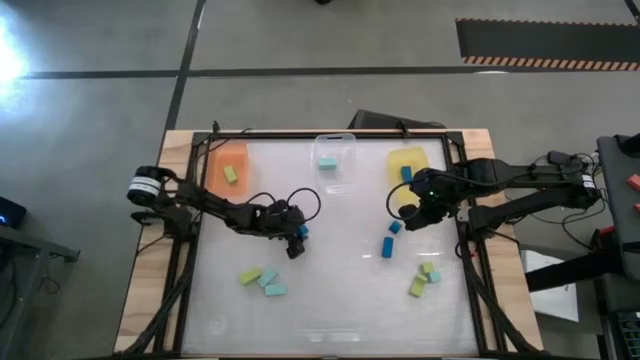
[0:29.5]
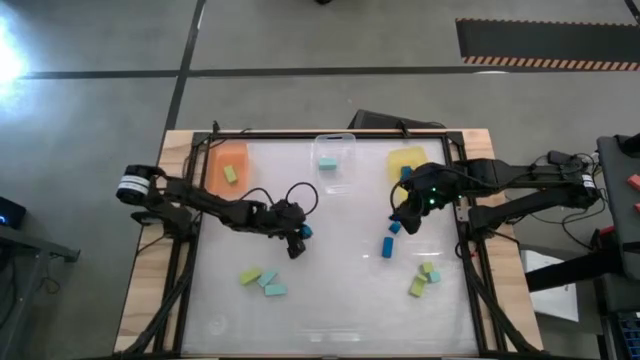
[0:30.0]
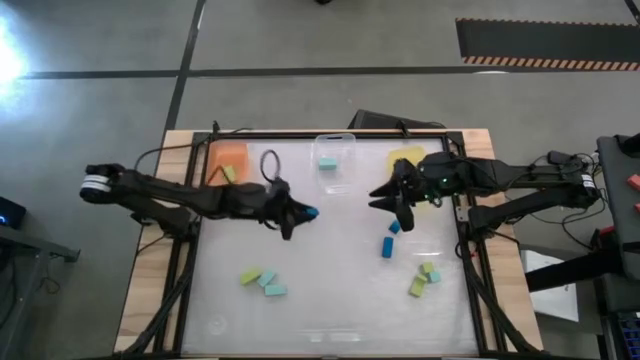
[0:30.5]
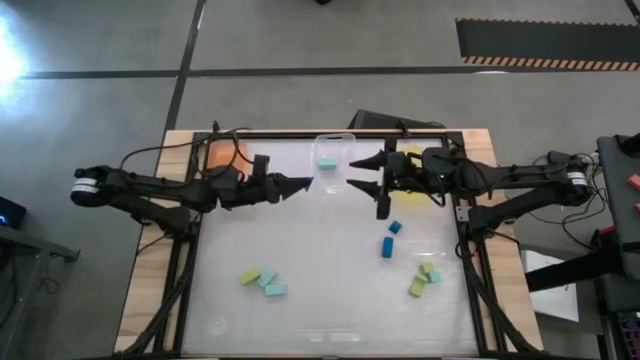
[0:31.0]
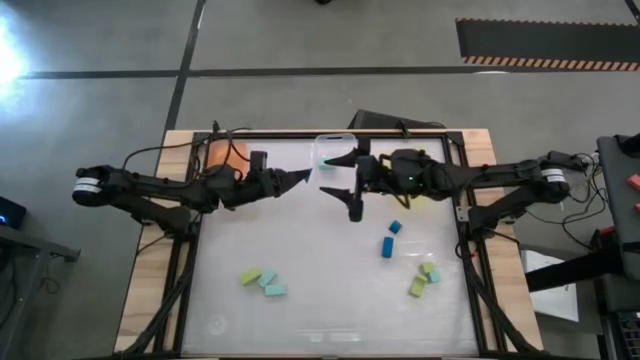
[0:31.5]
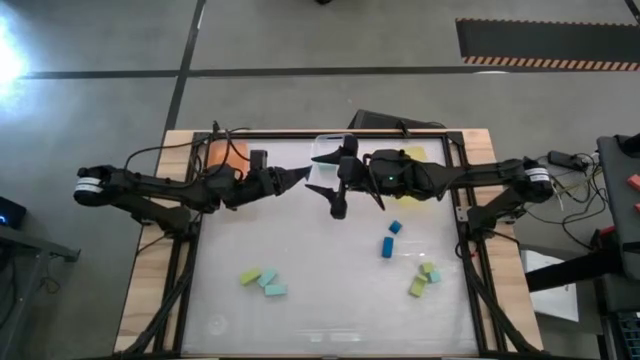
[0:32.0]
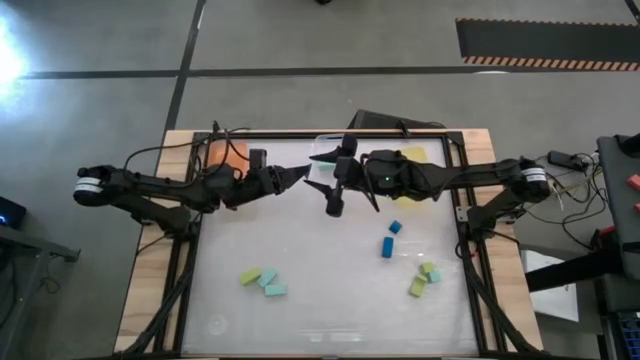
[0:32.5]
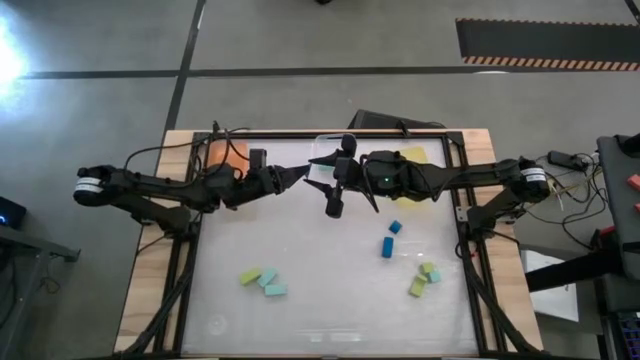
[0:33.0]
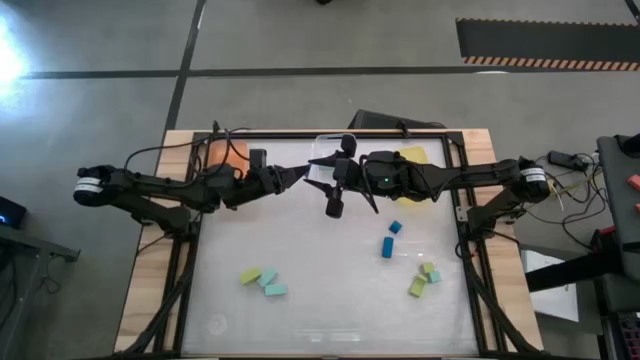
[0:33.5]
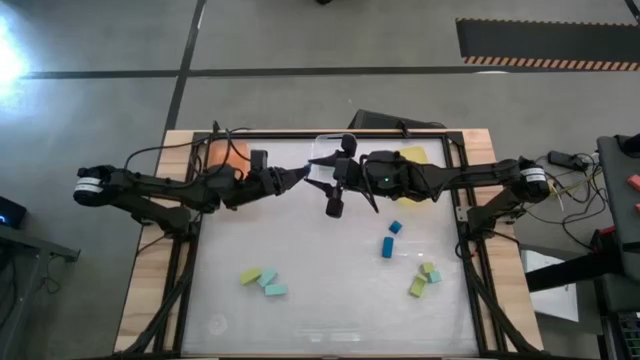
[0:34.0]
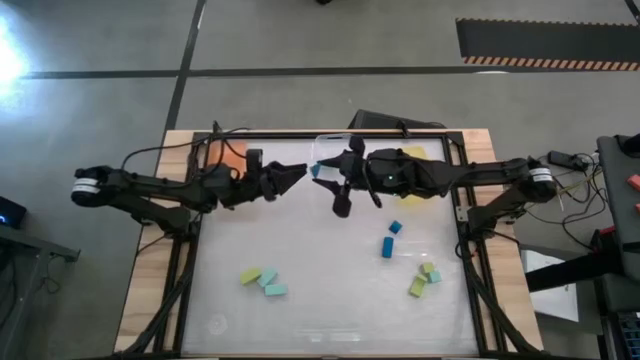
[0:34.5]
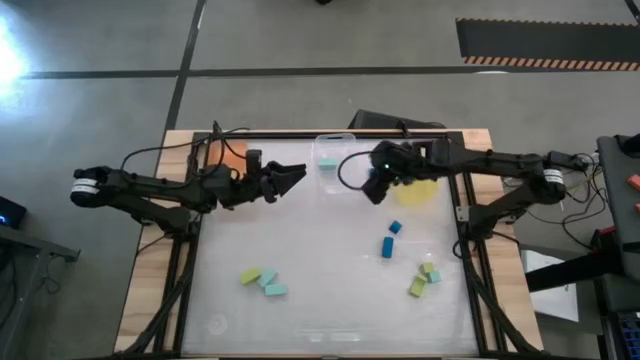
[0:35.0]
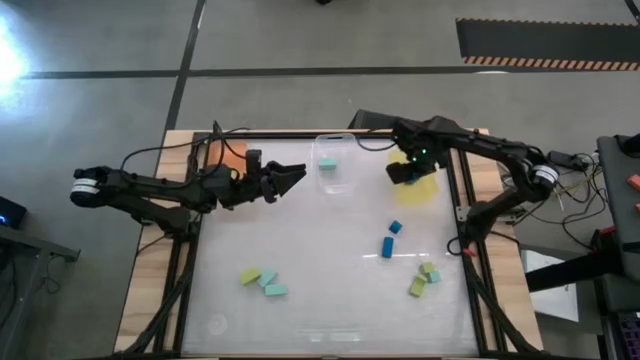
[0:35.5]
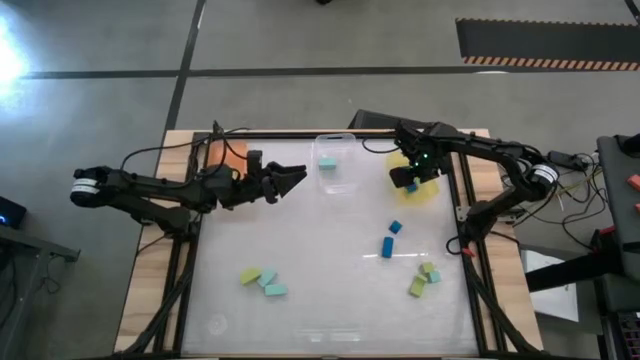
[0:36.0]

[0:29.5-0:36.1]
Task: Sort & place blocks by color
Put the blue block into the yellow bin

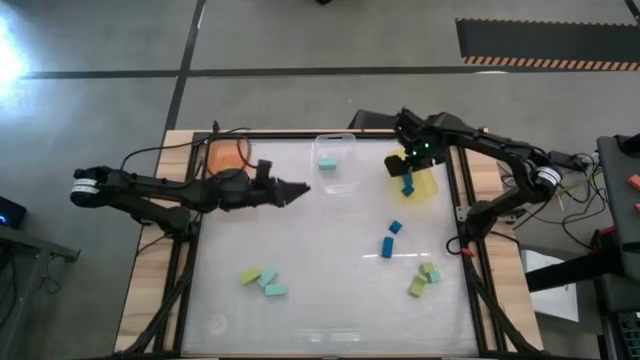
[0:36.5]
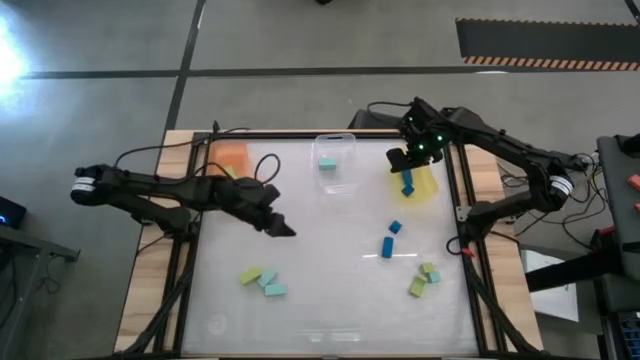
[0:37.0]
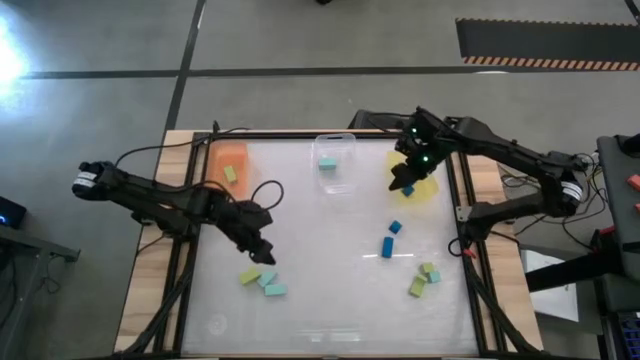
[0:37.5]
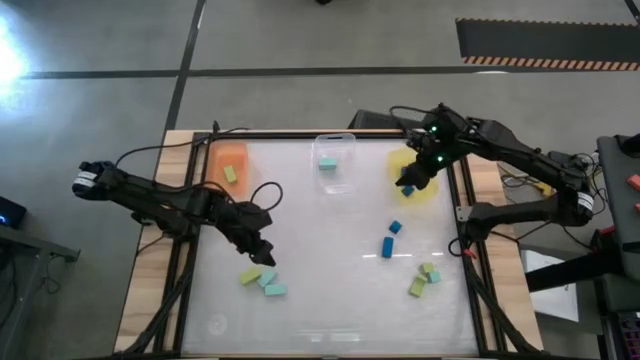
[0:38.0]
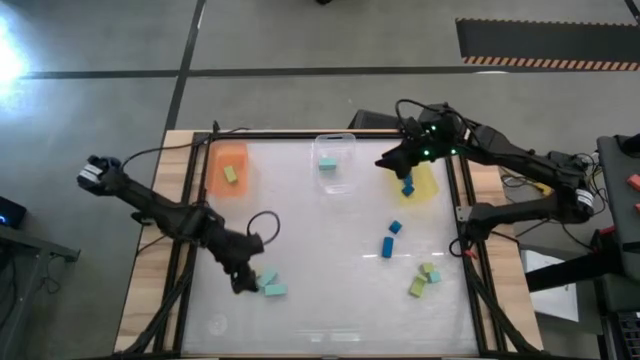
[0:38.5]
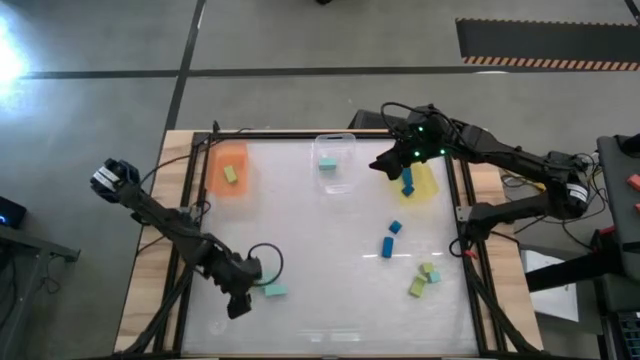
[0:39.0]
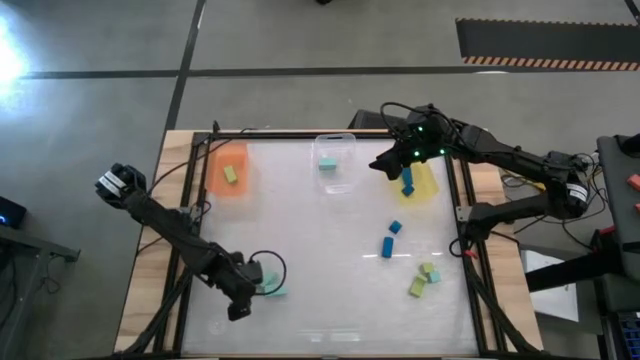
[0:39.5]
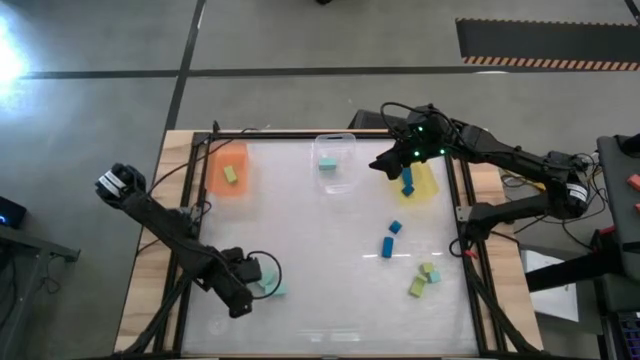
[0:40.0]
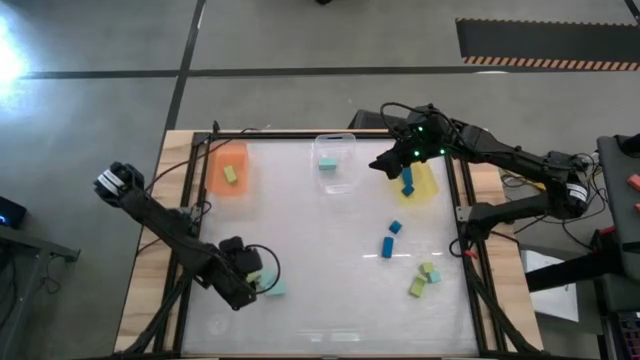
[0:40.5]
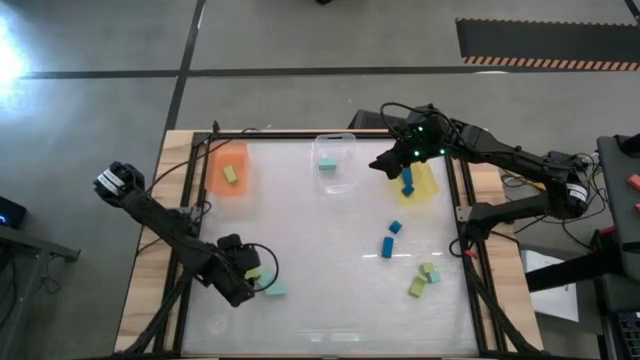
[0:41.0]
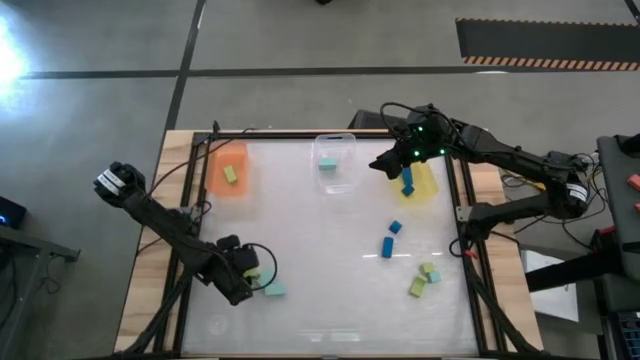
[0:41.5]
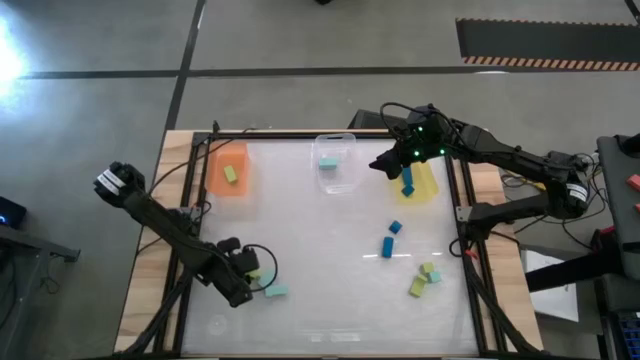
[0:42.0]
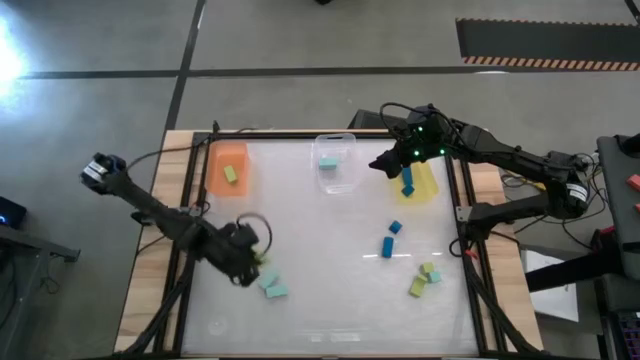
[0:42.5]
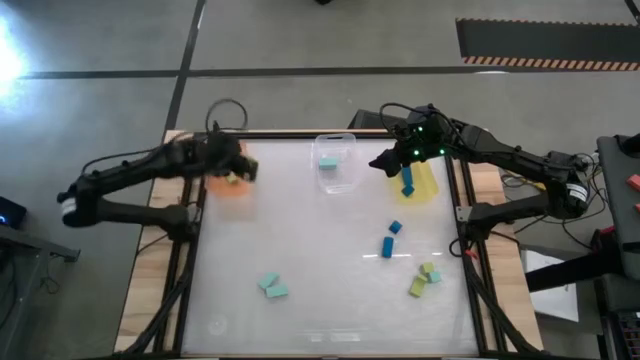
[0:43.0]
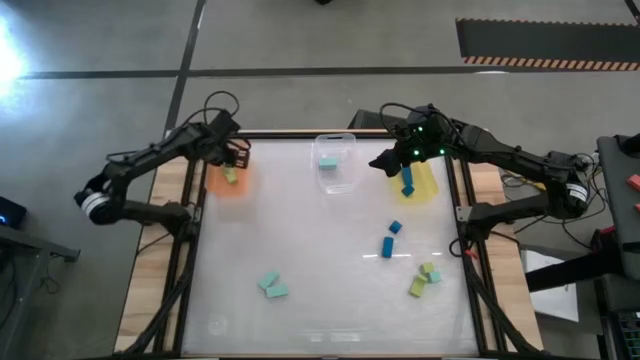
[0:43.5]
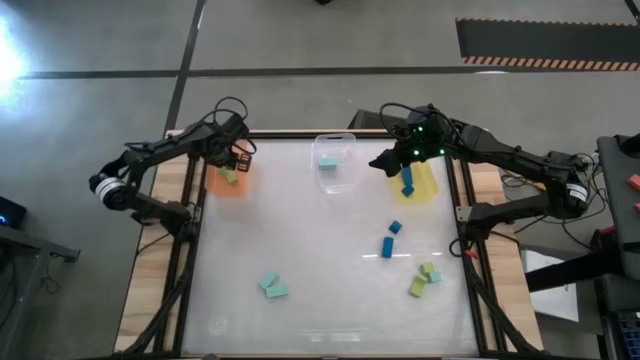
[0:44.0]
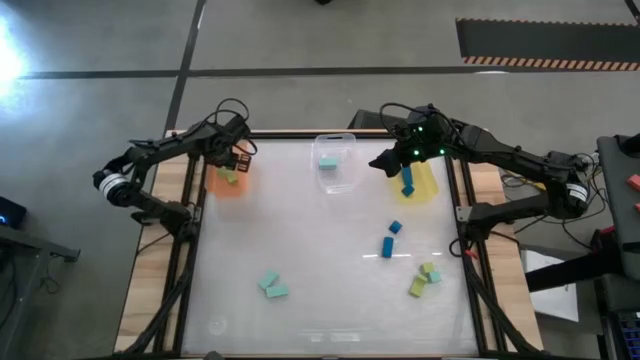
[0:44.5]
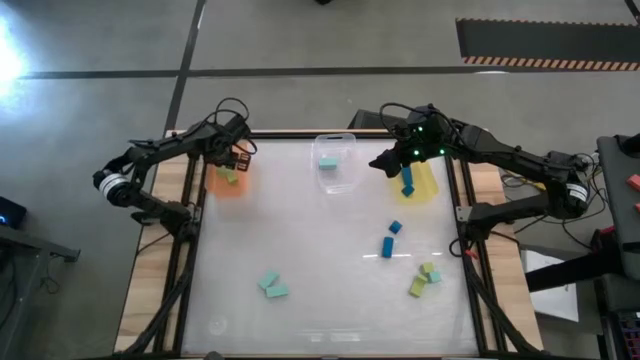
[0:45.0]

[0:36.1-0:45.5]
Put the light green block into the orange bin

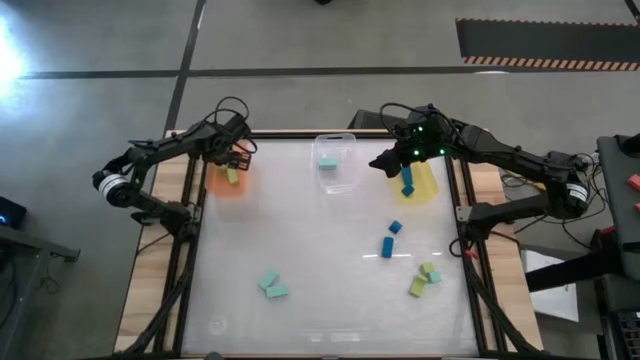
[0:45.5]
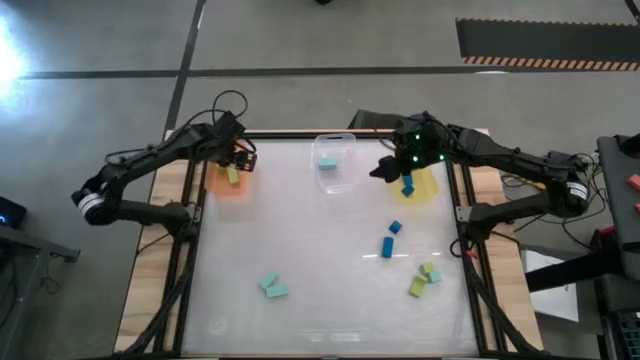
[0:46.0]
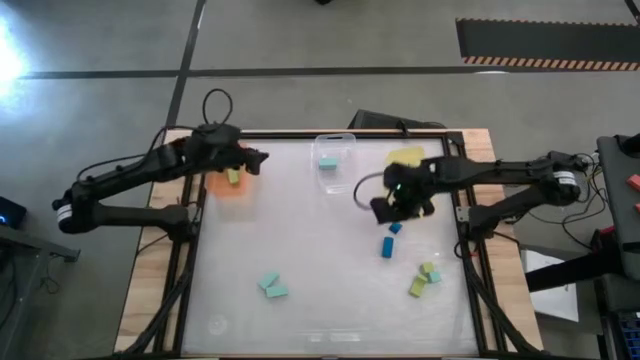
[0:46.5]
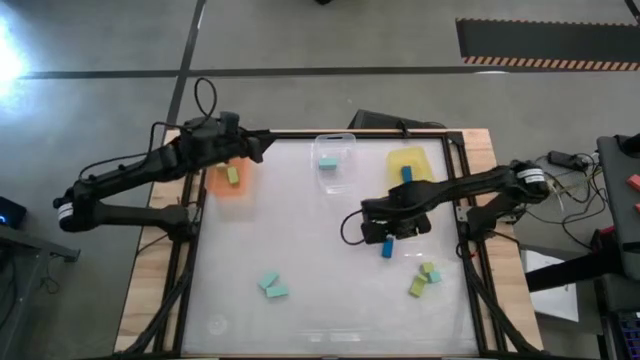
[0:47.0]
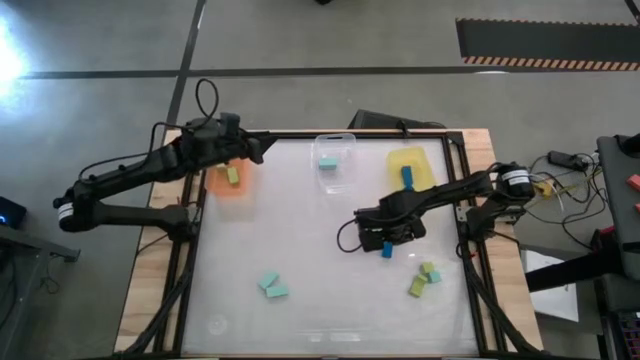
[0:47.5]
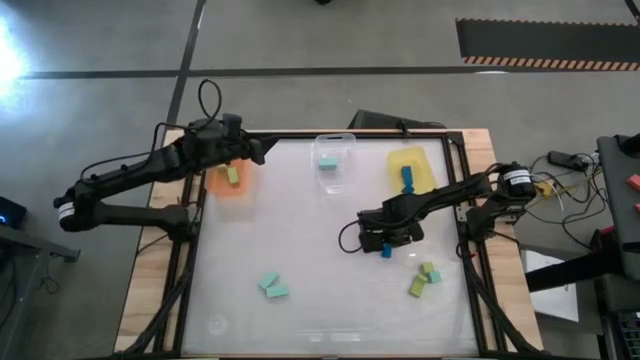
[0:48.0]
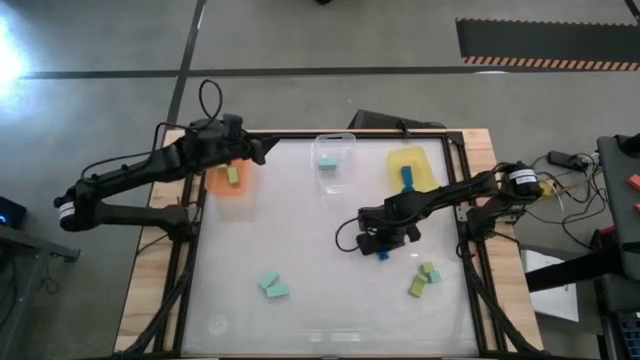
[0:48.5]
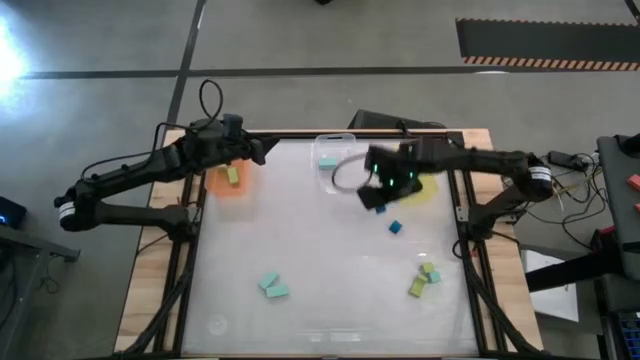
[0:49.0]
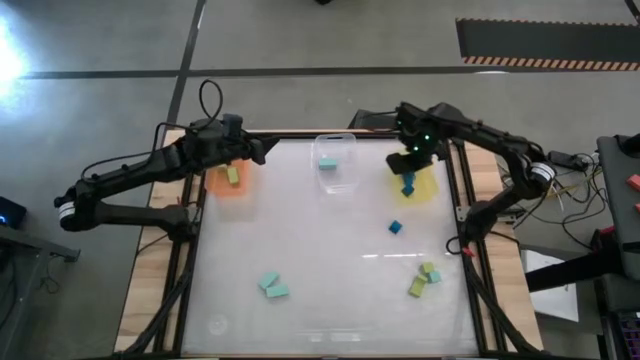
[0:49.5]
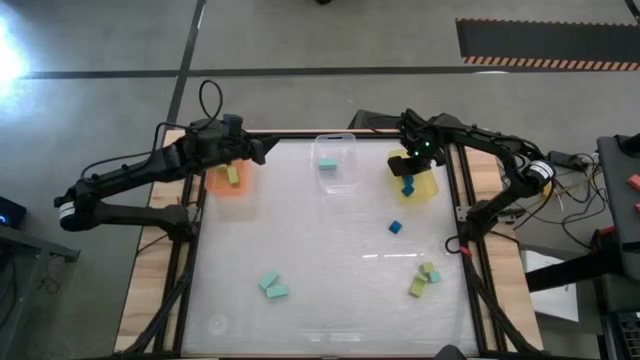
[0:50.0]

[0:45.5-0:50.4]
Put the blue block into the yellow bin
